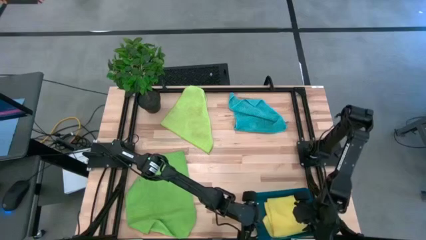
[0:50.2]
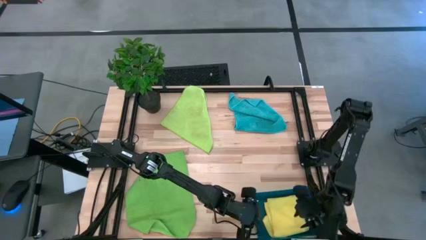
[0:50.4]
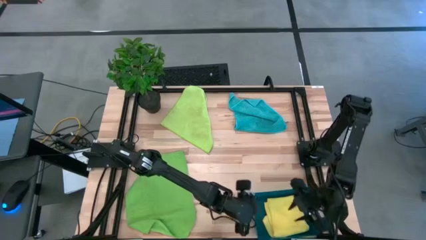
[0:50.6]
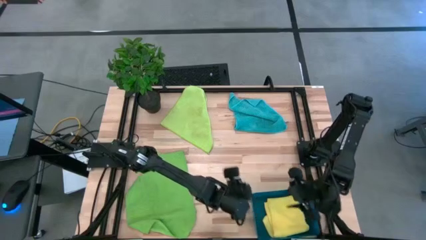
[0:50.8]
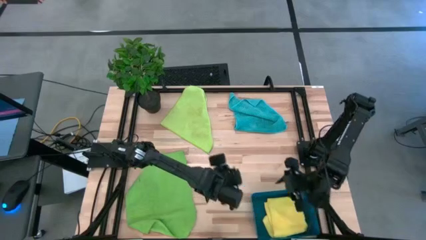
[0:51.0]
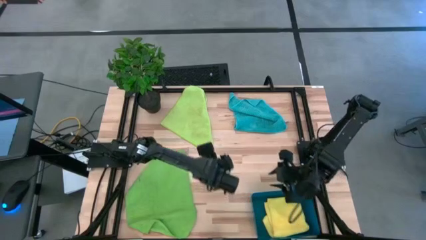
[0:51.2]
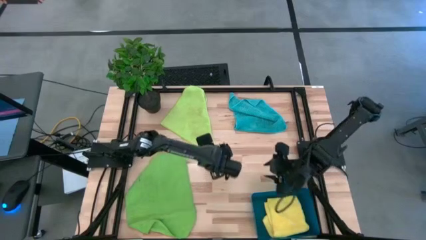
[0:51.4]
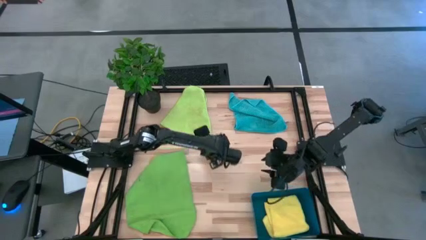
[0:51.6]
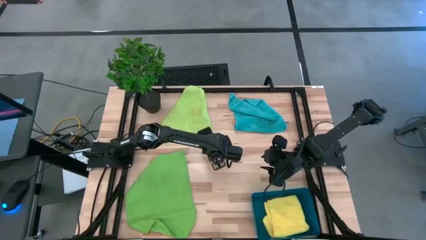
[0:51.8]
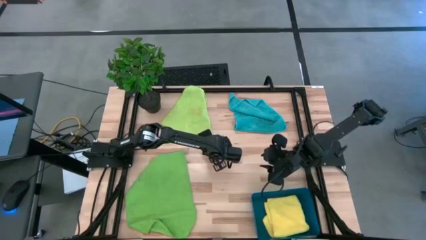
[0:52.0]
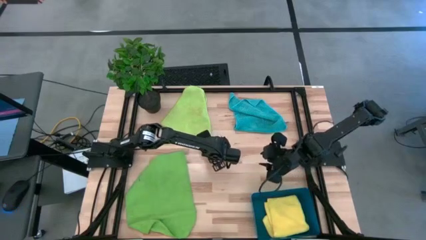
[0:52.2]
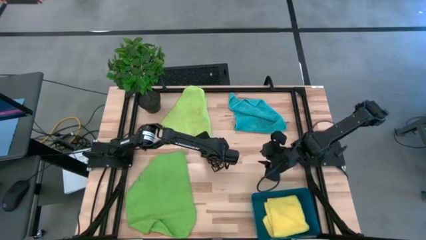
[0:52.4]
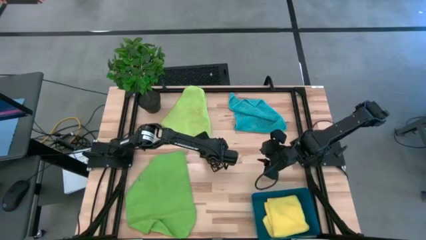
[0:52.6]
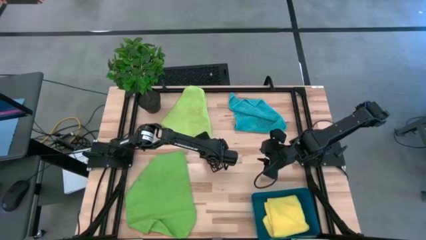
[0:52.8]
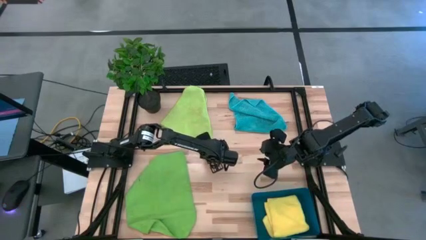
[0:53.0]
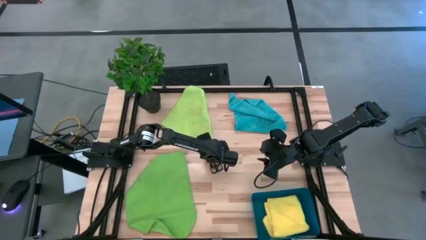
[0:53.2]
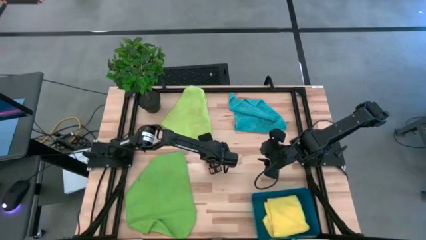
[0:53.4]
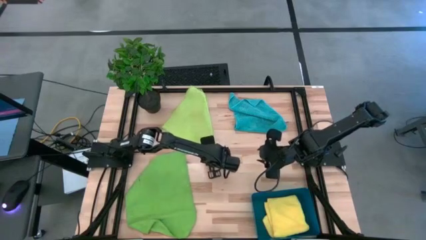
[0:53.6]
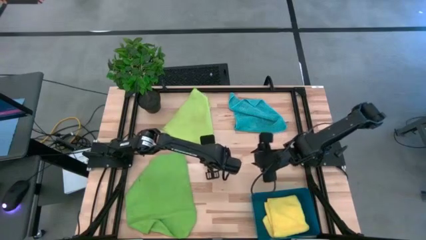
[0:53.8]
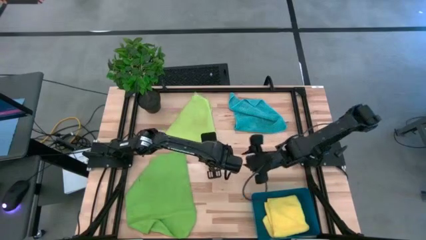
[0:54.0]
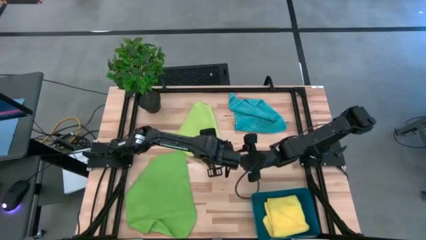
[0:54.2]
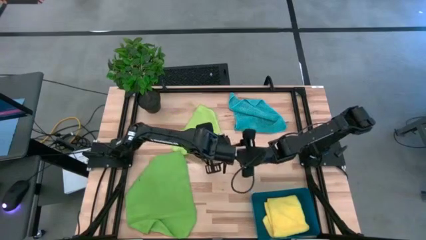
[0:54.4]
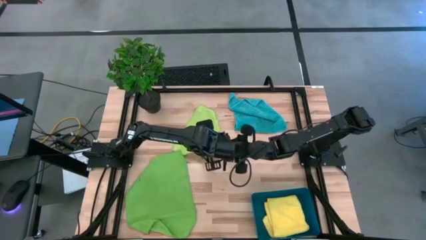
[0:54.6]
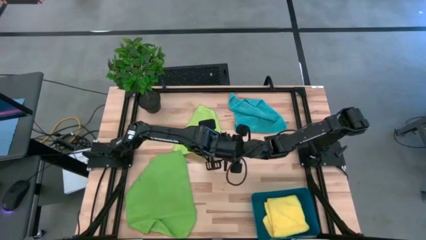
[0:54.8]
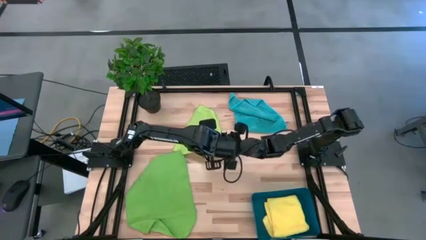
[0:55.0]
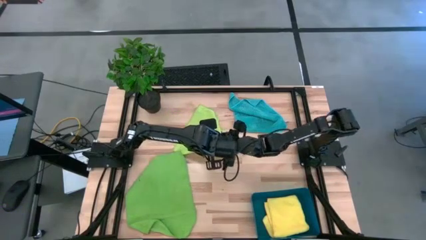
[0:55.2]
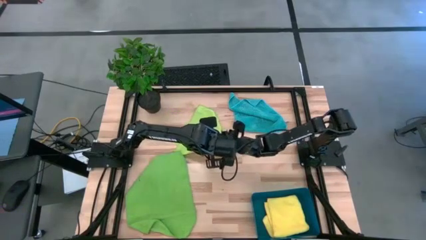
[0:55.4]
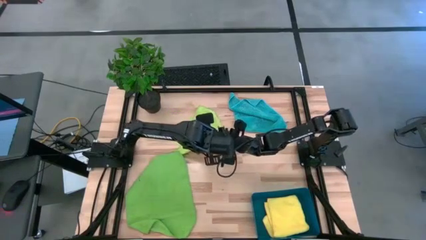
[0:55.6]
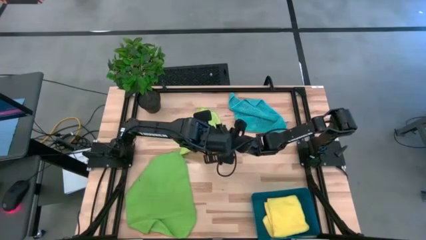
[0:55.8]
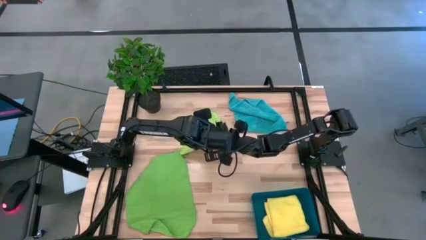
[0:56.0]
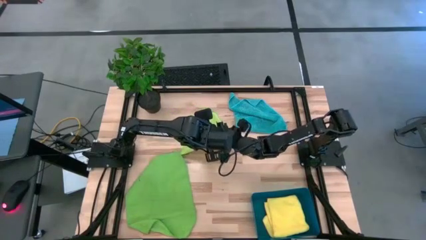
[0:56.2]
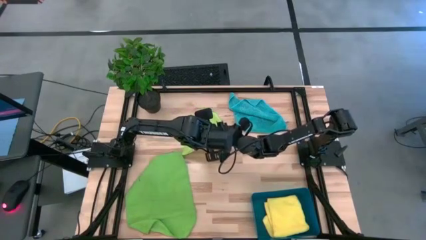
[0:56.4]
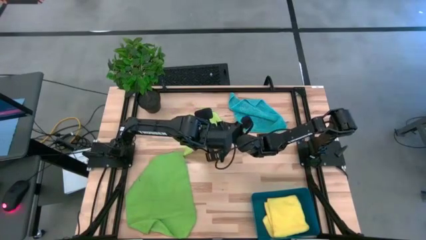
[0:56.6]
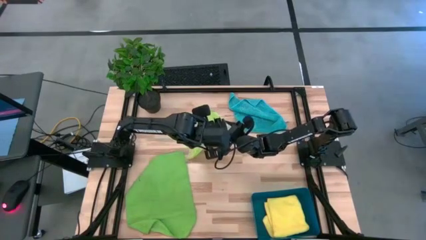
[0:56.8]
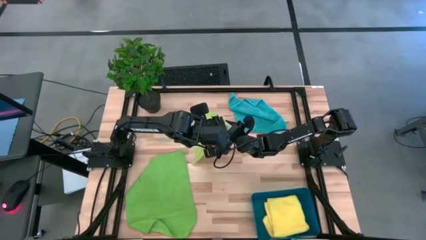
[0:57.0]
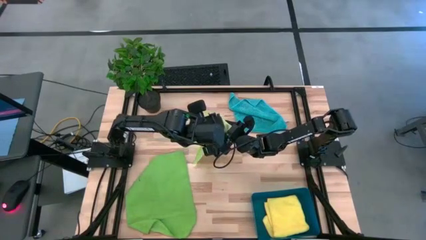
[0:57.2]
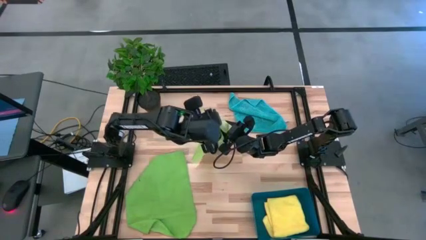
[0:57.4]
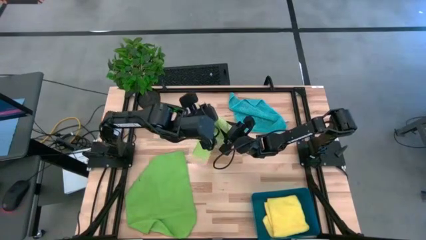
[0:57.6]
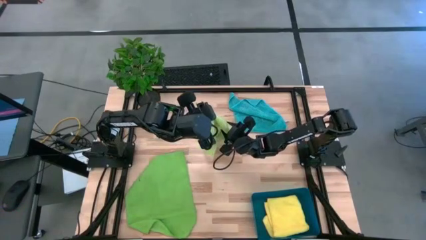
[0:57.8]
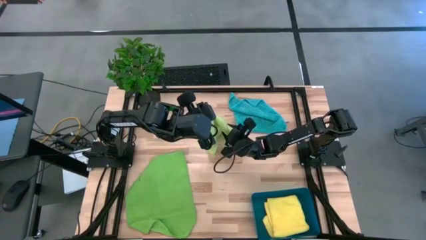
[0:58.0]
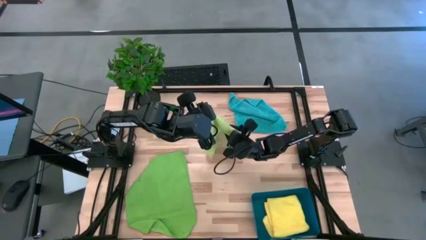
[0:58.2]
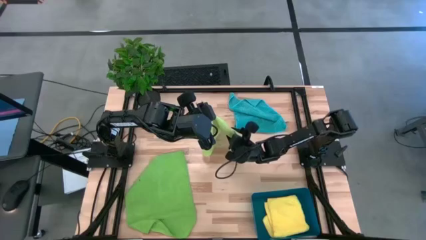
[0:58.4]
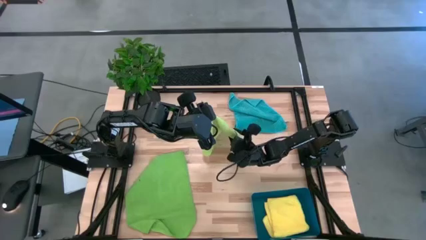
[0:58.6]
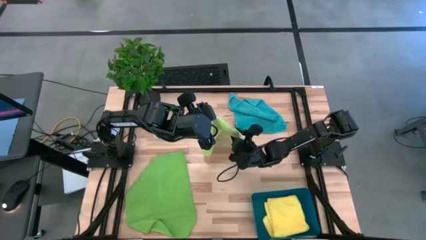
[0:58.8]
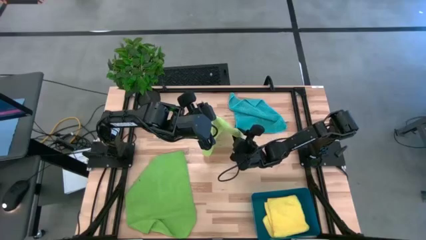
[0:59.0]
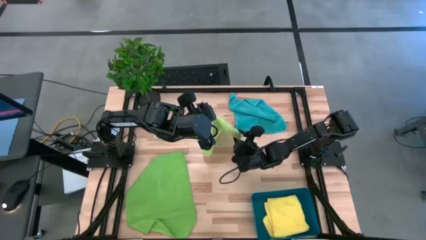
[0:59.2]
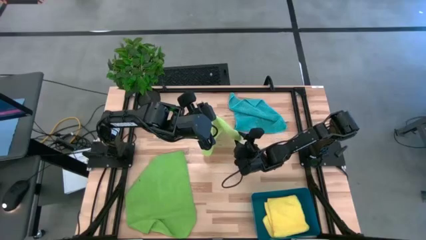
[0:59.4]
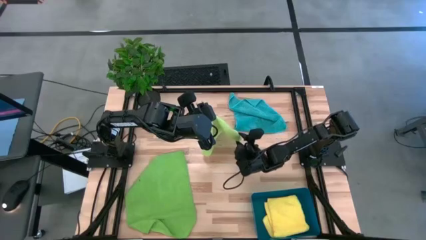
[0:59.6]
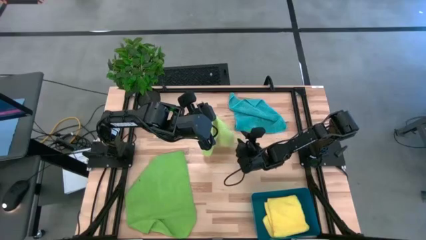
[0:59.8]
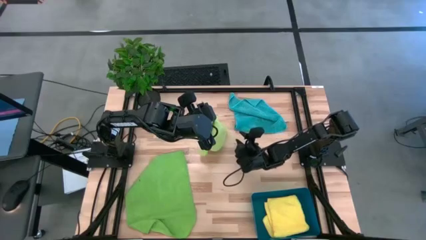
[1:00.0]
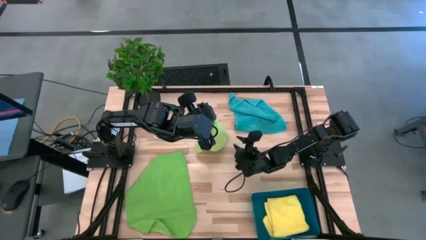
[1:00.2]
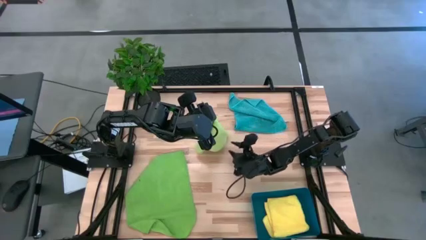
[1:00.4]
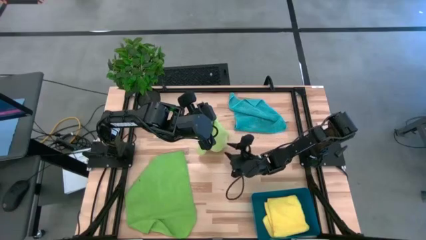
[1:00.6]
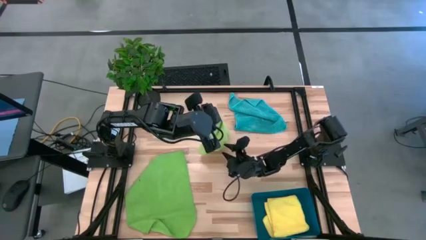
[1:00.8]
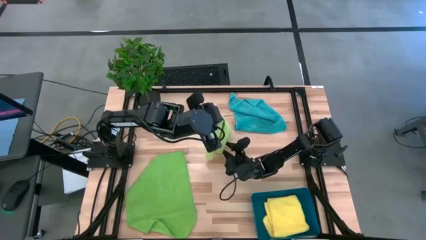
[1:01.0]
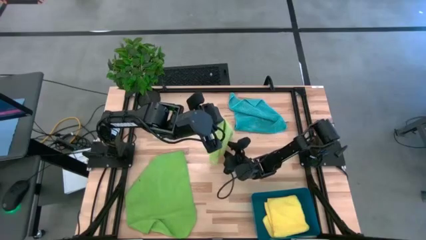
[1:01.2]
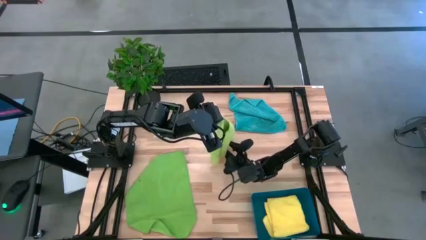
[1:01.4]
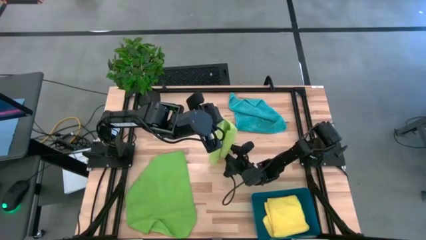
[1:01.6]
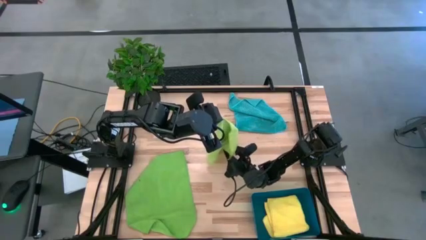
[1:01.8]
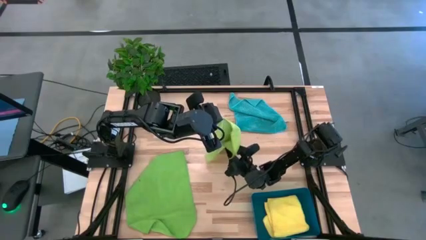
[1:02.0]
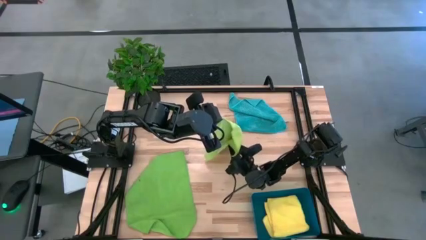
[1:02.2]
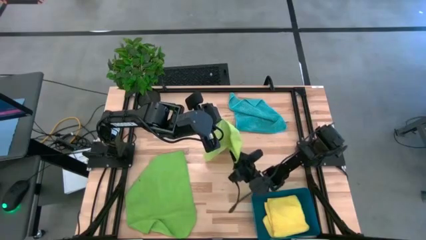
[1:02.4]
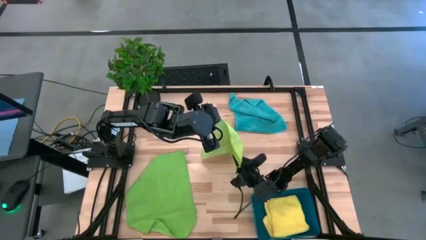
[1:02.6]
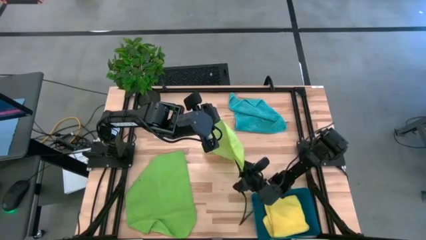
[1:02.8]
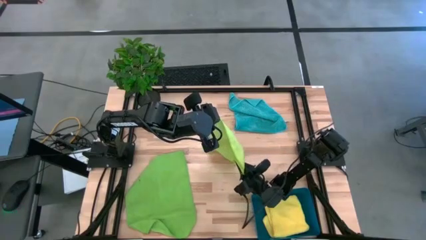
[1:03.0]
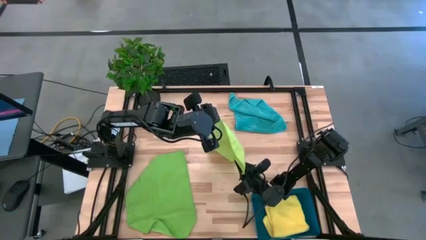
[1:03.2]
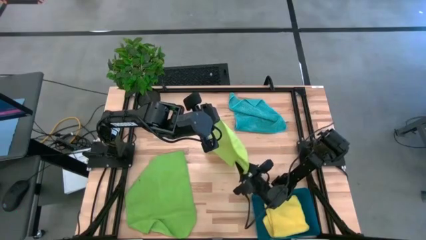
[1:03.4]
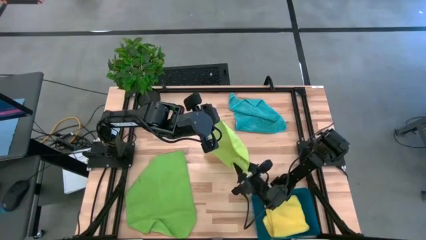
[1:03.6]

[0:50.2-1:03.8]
Task: Fold microfiber towels
Fold the light green towel

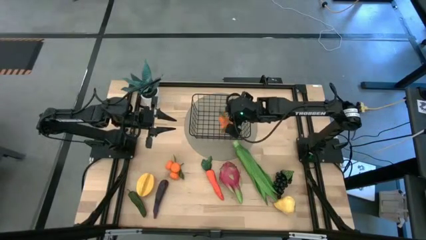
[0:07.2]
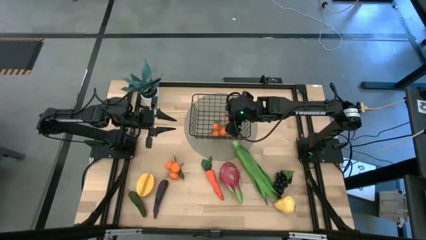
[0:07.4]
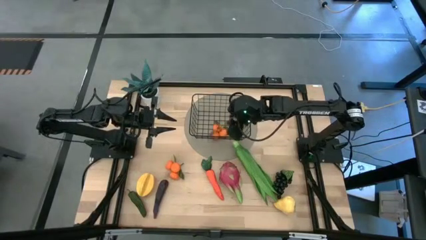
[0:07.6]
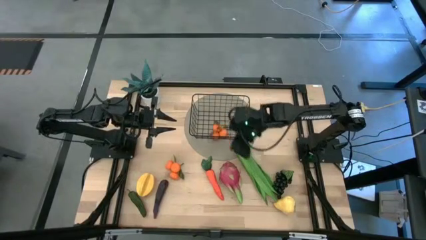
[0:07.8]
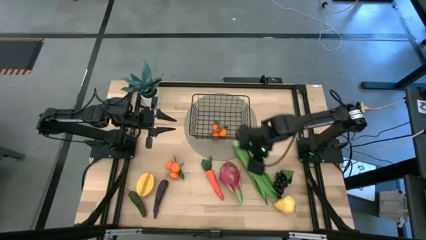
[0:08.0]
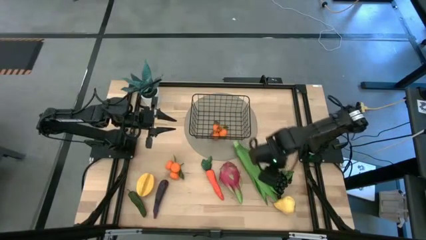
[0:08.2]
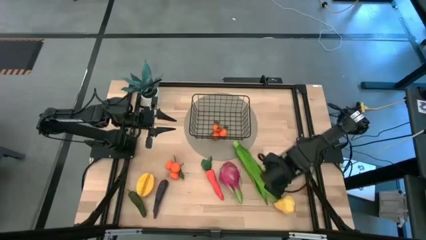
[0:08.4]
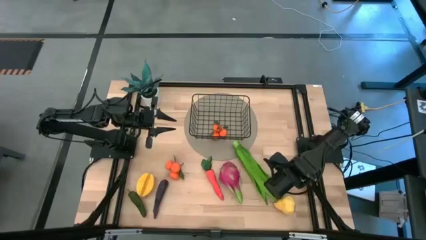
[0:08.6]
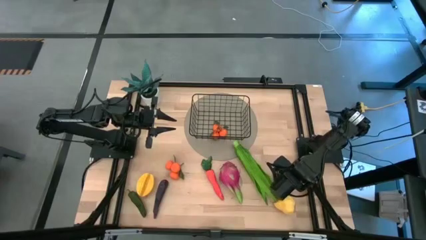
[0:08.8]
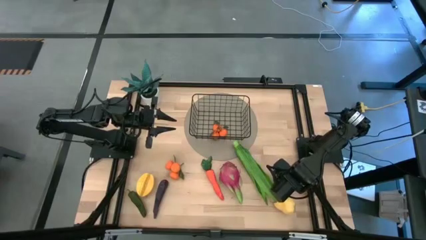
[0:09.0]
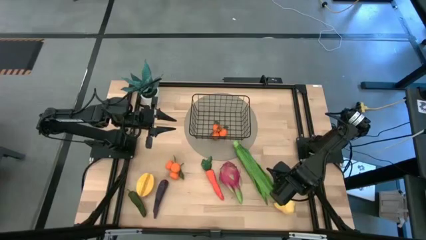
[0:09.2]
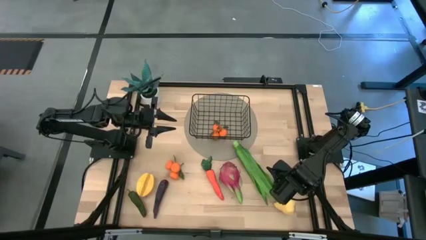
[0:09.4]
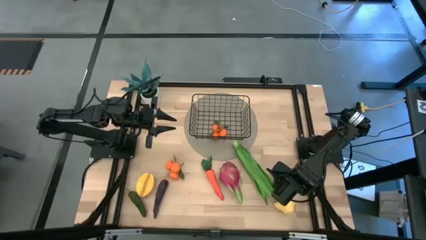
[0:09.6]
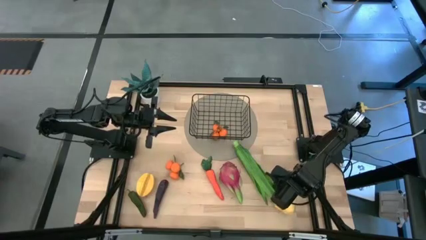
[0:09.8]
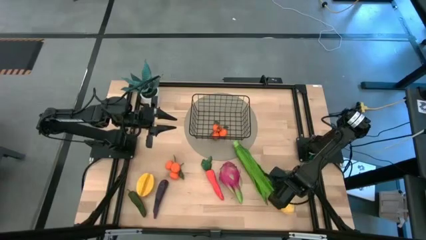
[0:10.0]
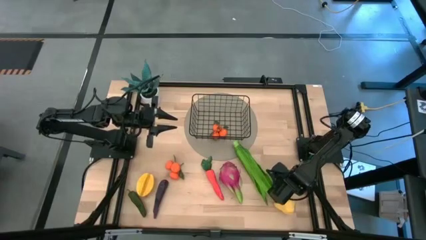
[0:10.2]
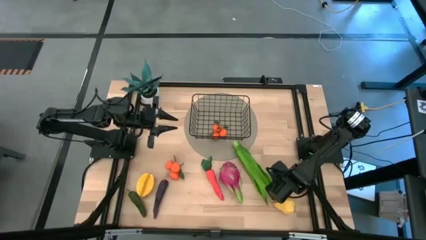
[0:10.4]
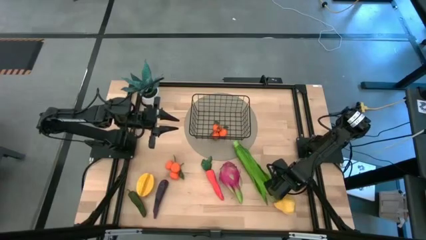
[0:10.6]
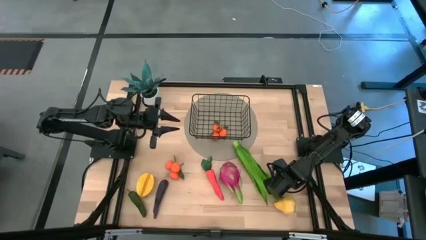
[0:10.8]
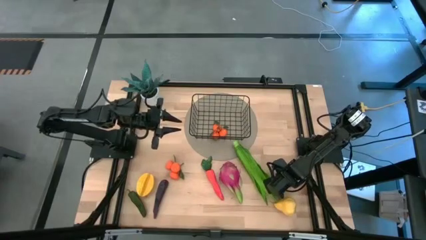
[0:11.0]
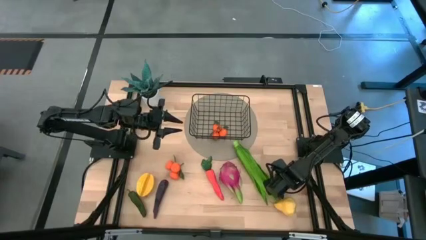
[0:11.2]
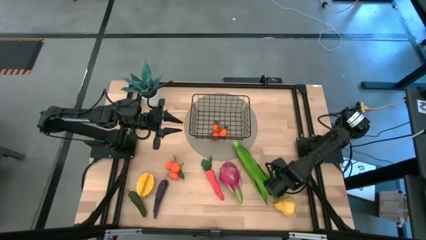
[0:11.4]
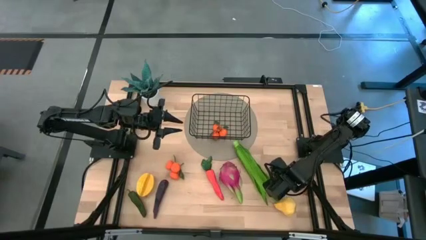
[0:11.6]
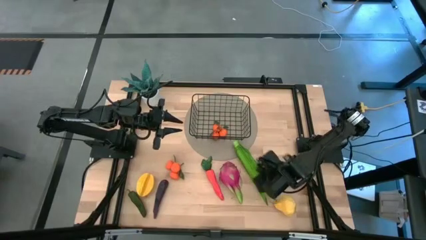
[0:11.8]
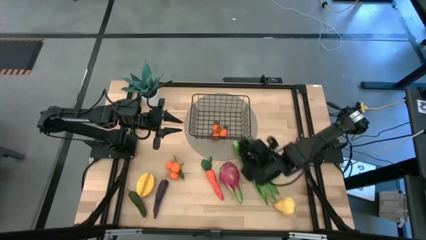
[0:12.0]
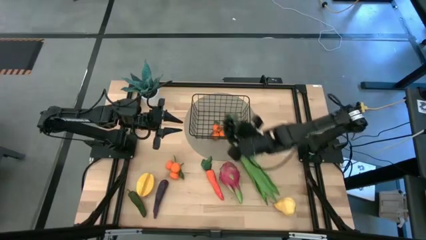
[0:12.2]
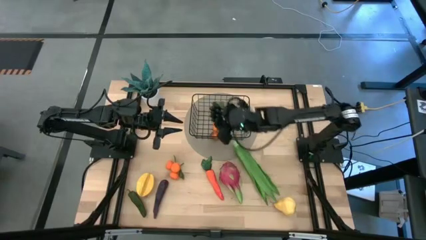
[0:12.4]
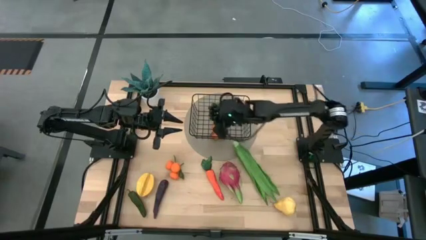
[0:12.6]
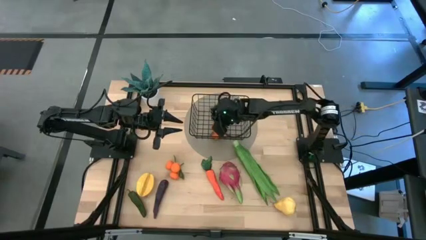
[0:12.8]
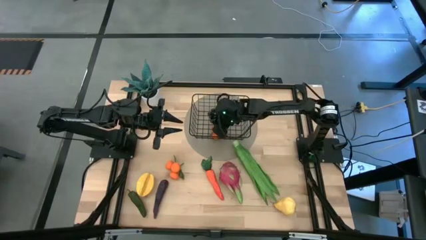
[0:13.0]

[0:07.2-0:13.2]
Task: Build produce basket
Put the grapes into the wire basket
